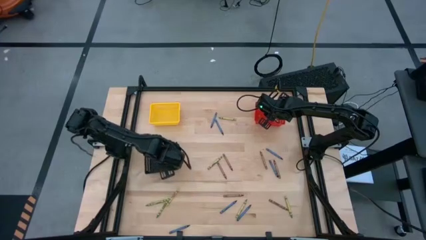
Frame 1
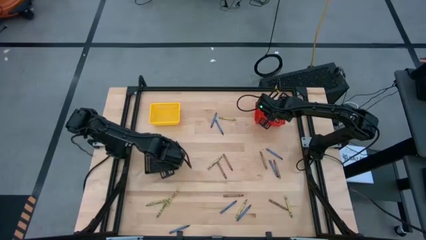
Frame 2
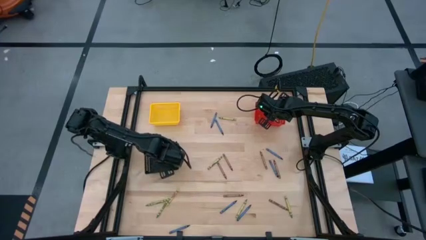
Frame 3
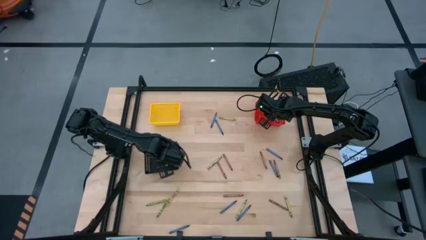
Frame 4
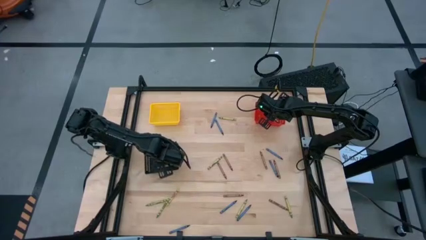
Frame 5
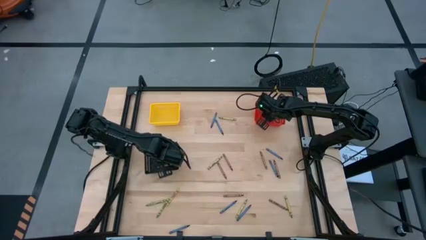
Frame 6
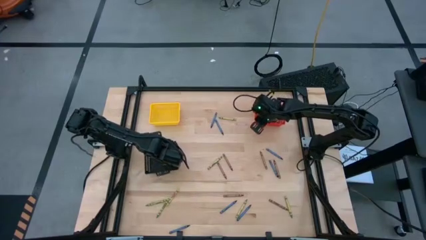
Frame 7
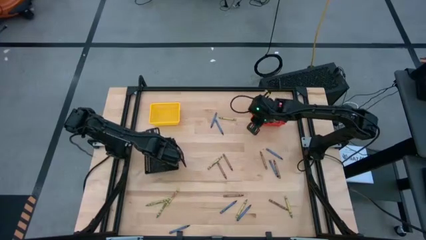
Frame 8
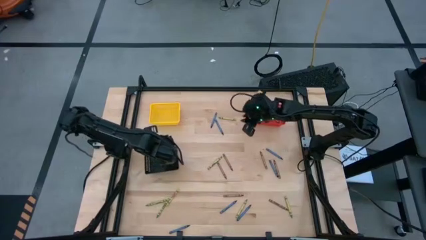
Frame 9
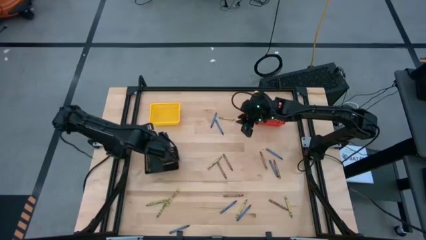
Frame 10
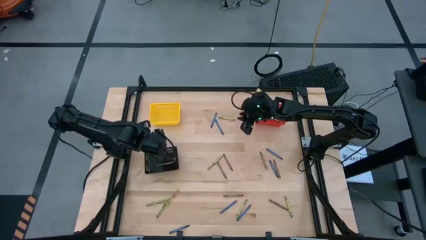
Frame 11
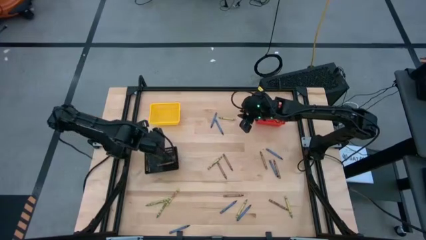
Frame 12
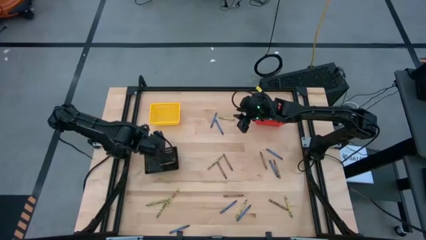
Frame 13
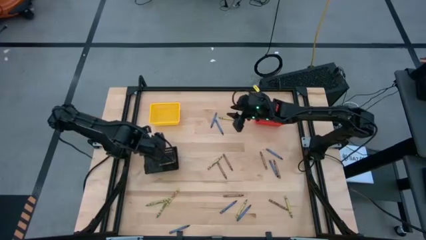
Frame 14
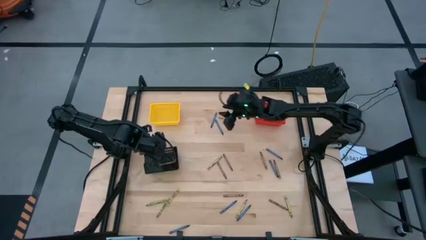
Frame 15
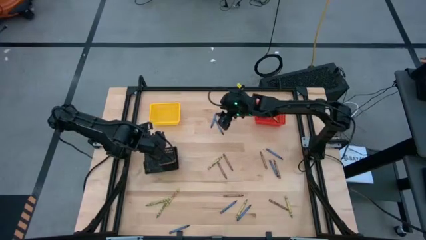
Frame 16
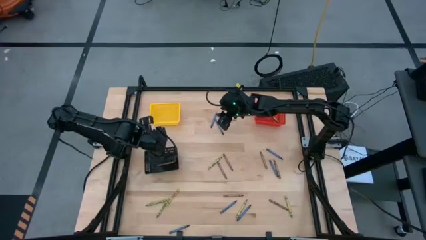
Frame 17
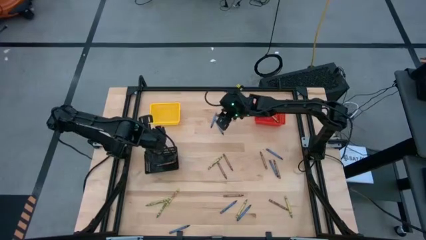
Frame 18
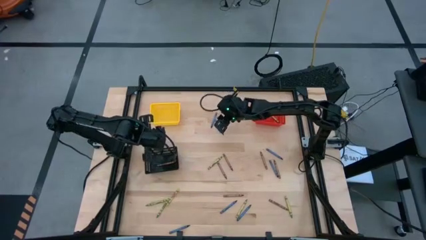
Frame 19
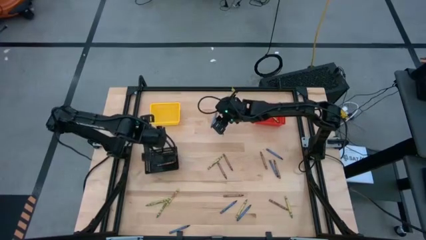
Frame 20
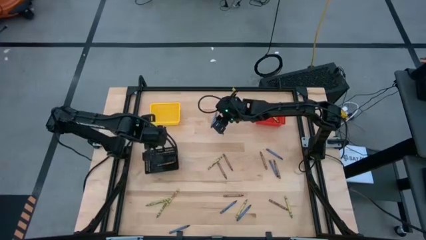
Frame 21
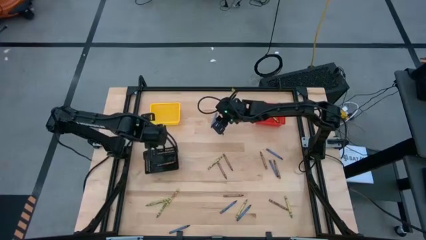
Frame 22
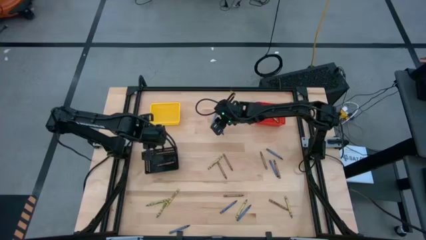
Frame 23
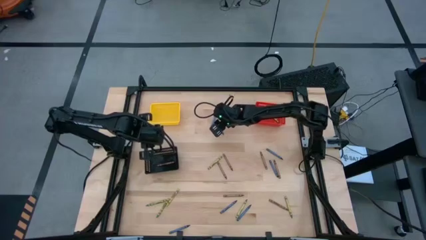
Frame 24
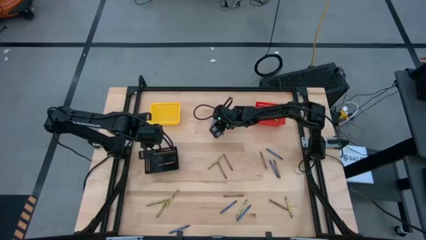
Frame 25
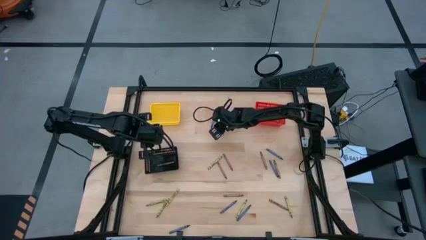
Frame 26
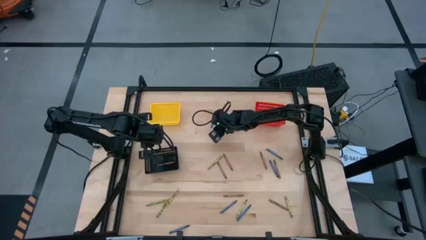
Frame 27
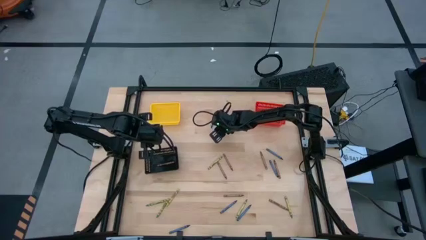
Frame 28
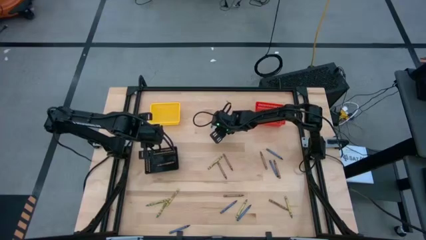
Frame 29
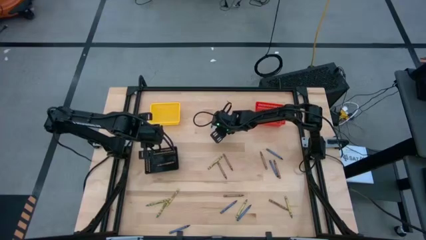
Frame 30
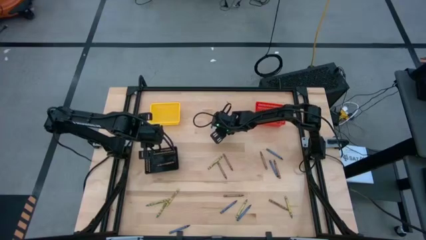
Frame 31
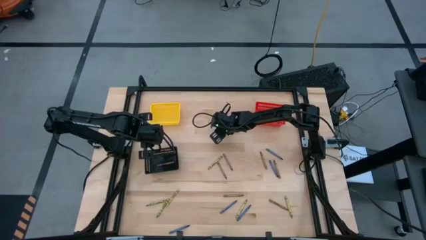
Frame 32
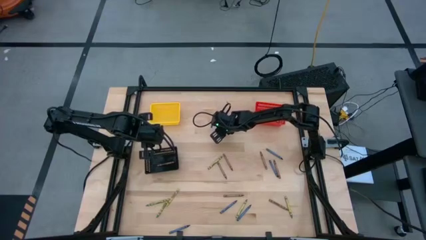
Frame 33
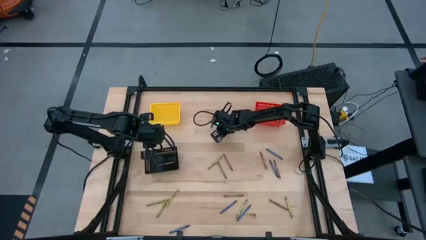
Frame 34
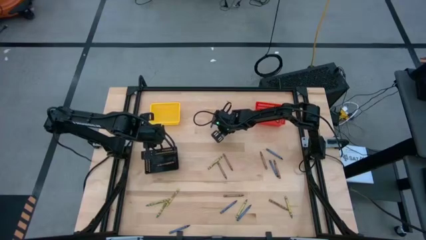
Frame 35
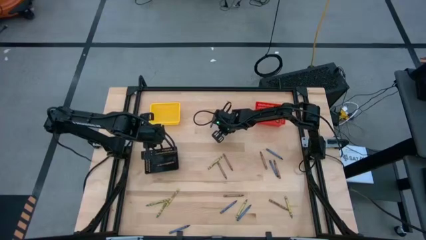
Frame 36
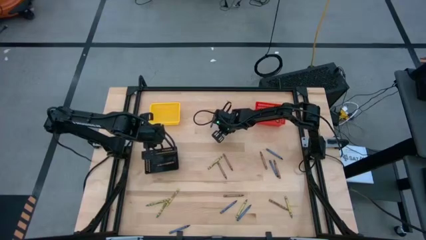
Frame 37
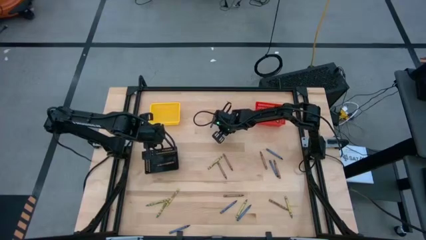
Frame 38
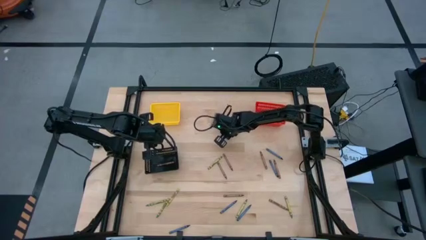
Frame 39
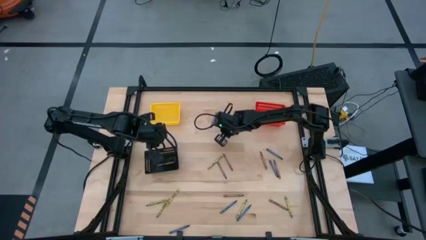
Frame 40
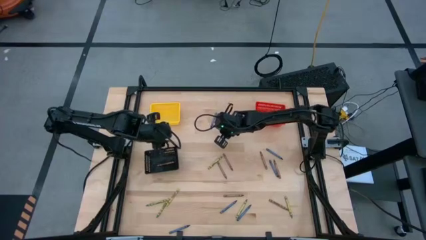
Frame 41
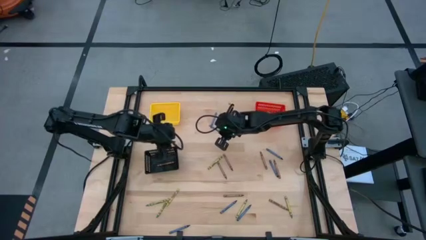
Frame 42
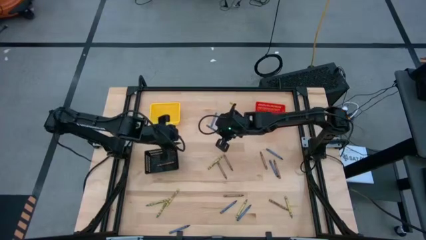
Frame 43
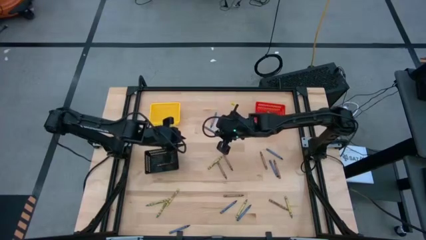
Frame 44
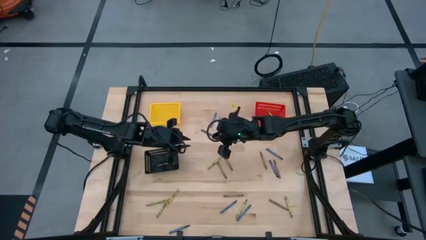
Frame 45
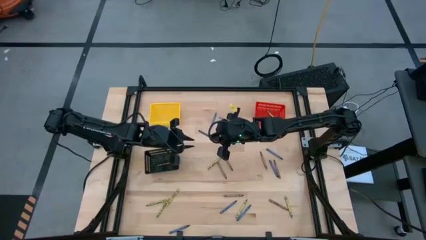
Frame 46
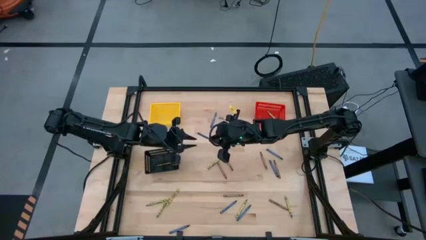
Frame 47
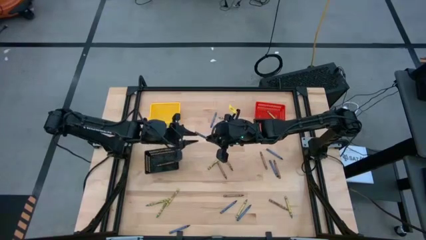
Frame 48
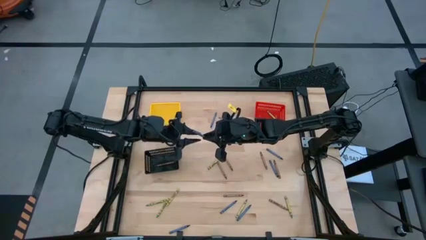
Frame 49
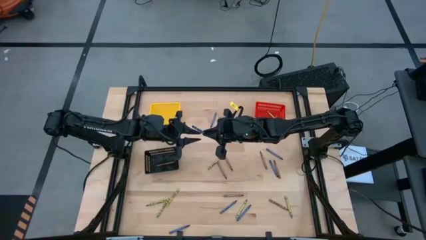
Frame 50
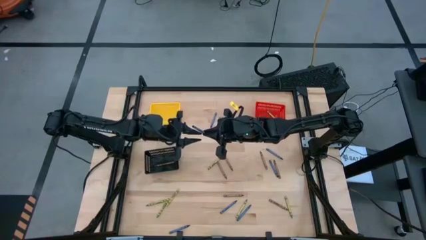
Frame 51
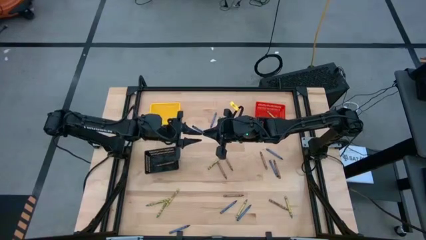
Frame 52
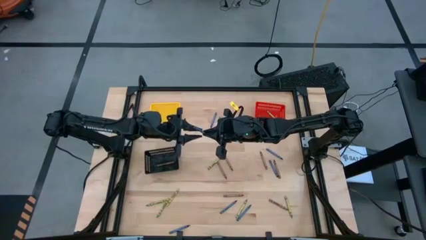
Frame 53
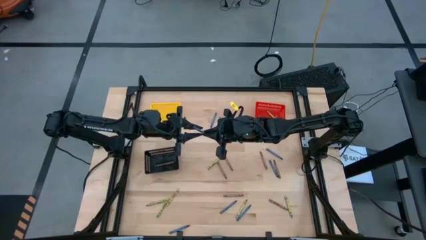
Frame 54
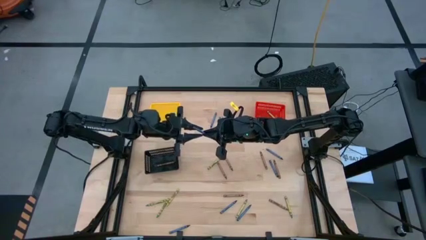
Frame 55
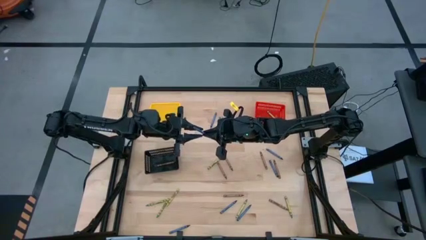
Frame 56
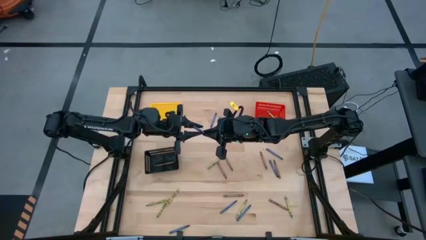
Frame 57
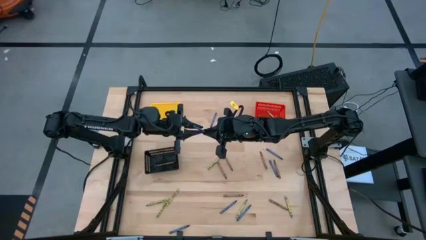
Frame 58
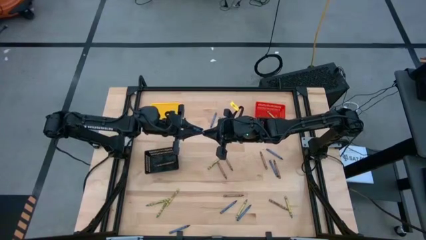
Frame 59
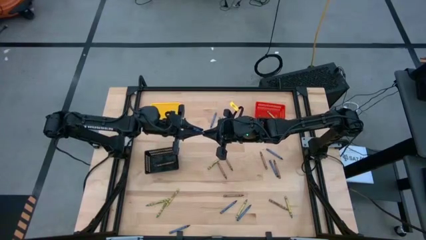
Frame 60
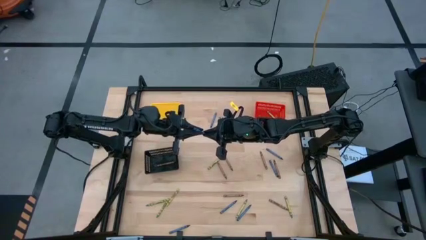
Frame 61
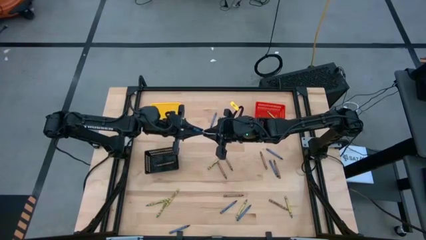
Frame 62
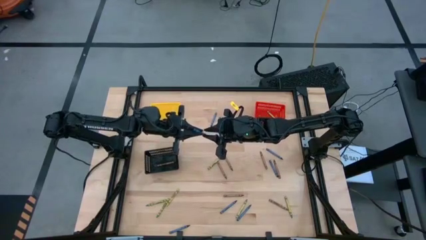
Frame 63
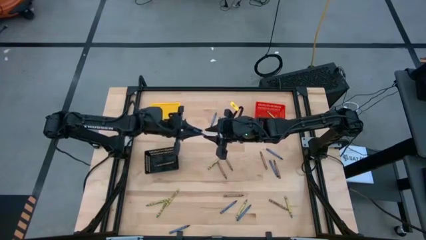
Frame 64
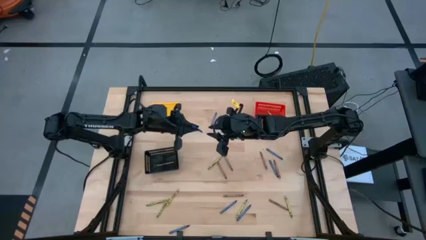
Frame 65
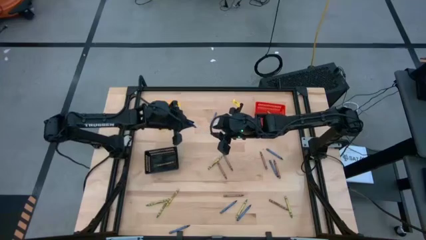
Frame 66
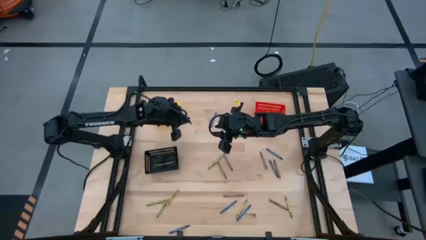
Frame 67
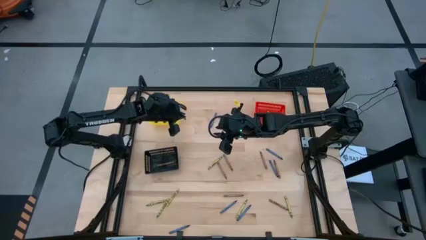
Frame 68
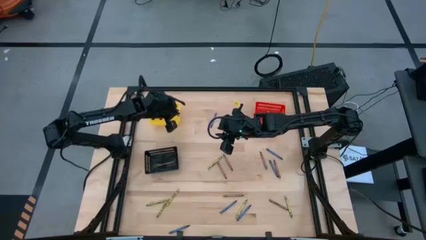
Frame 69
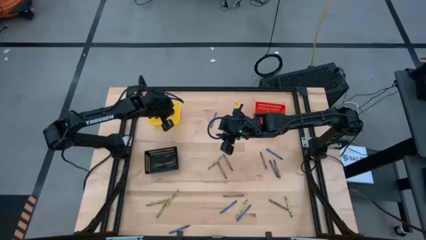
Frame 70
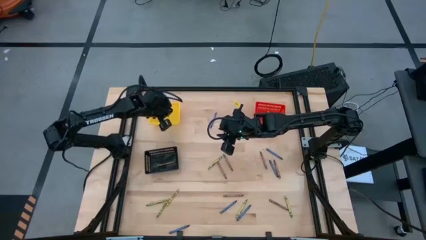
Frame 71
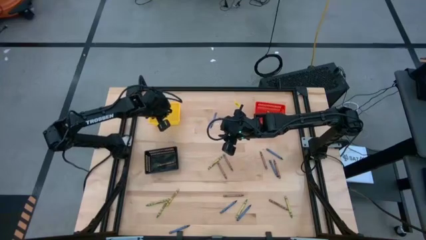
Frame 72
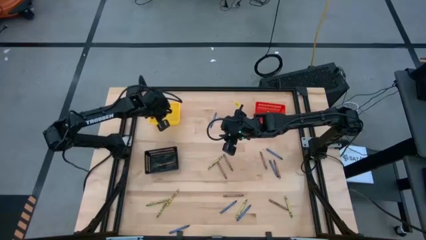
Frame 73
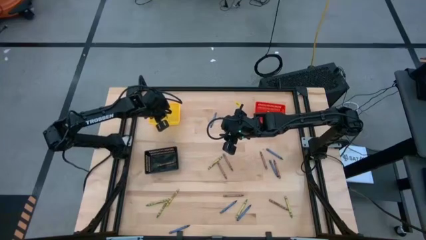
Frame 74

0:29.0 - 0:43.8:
Task: Sort crayons
Put the blue crayon into the yellow bin
